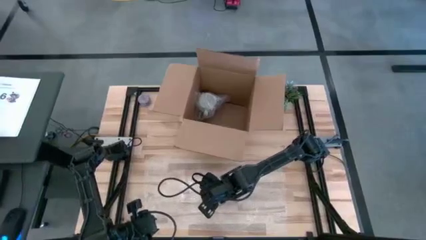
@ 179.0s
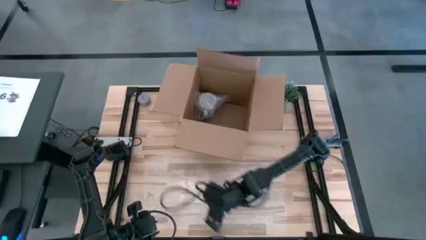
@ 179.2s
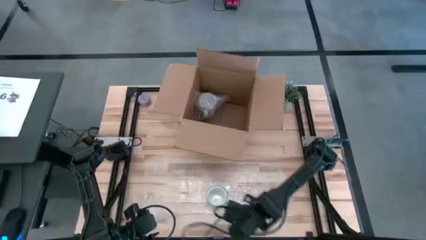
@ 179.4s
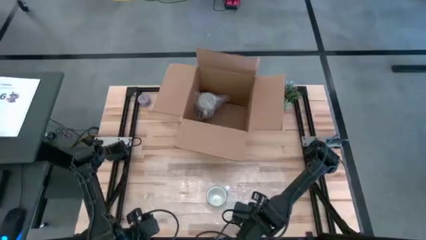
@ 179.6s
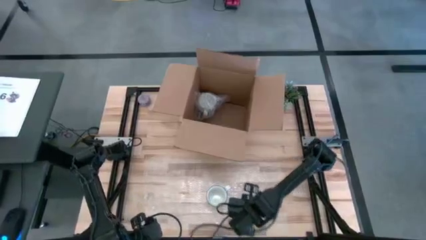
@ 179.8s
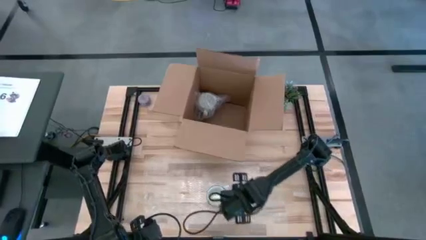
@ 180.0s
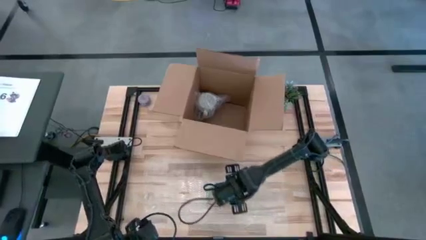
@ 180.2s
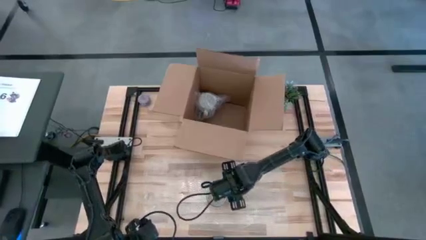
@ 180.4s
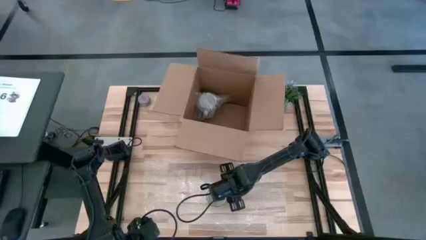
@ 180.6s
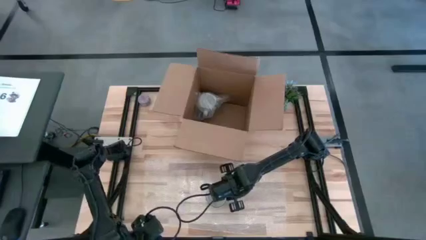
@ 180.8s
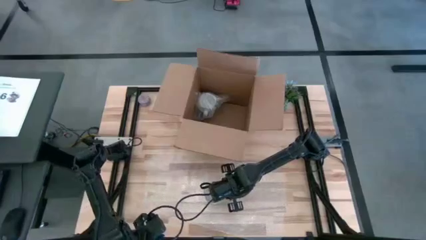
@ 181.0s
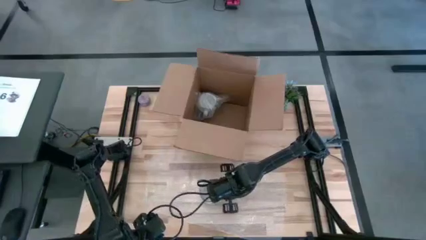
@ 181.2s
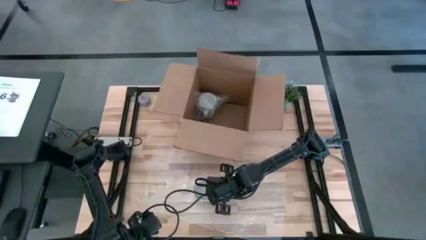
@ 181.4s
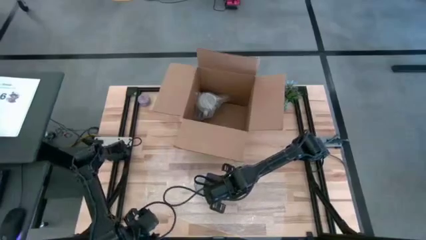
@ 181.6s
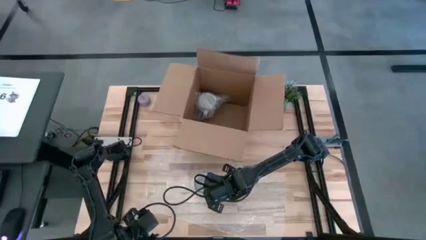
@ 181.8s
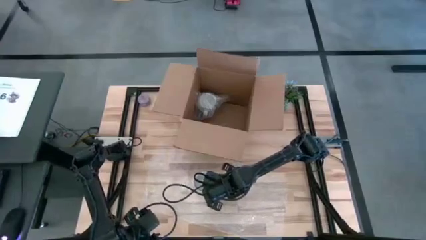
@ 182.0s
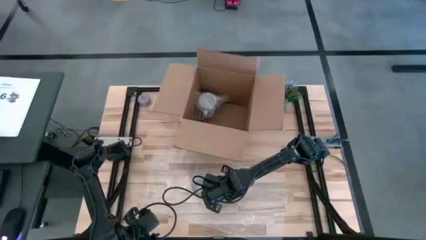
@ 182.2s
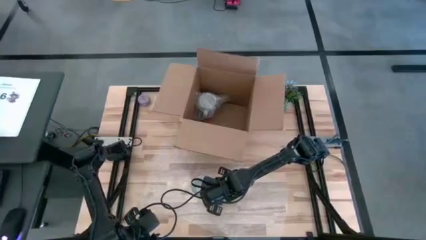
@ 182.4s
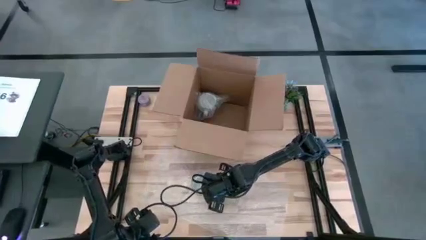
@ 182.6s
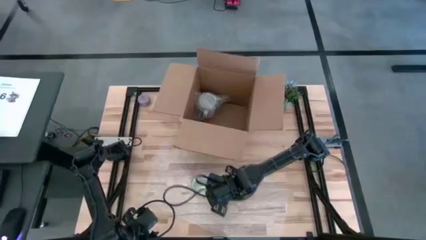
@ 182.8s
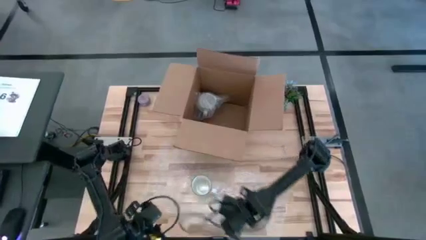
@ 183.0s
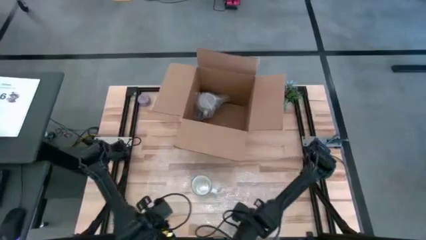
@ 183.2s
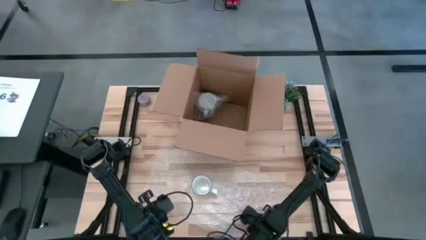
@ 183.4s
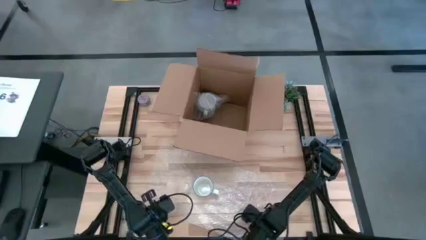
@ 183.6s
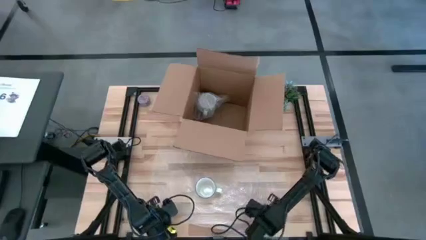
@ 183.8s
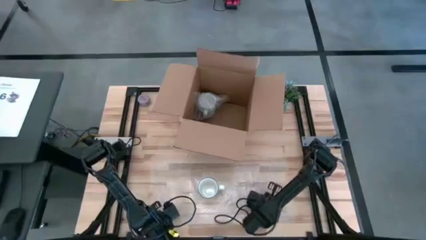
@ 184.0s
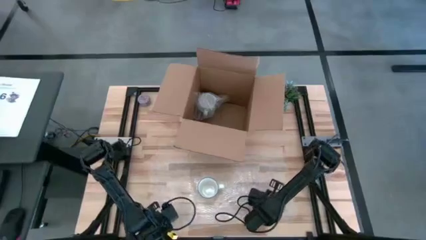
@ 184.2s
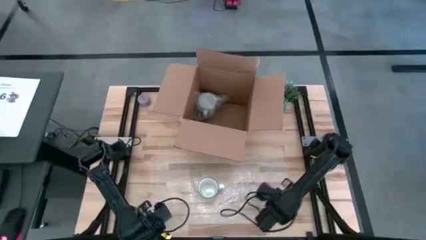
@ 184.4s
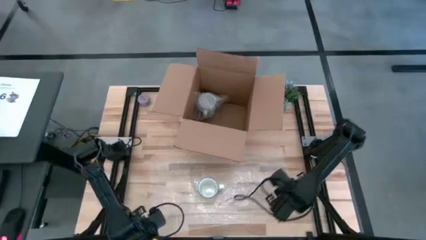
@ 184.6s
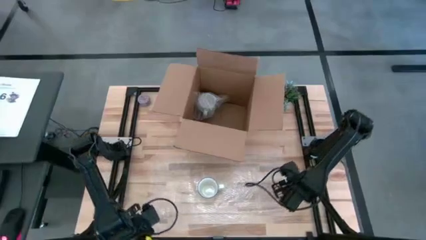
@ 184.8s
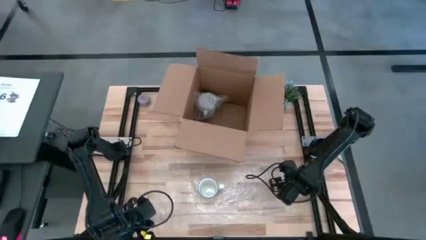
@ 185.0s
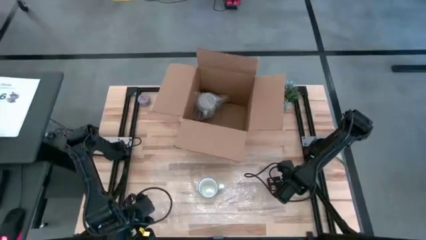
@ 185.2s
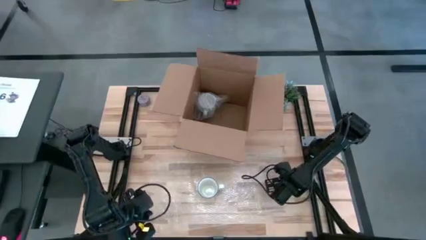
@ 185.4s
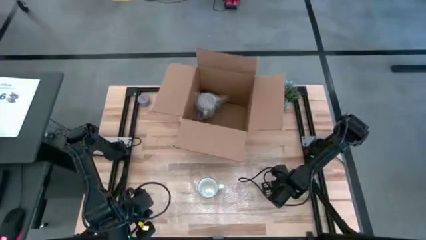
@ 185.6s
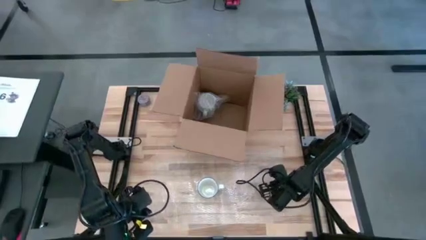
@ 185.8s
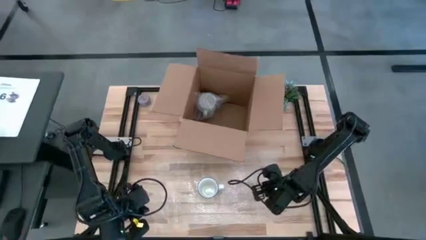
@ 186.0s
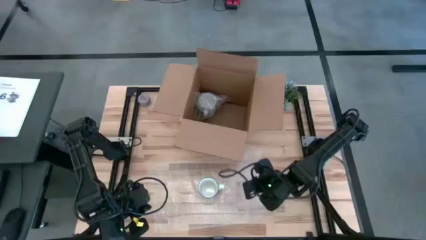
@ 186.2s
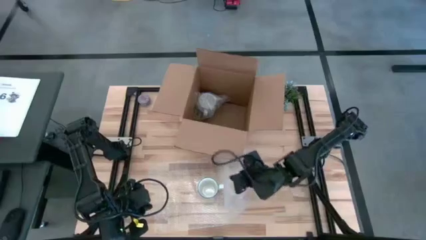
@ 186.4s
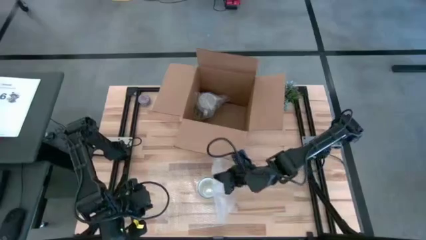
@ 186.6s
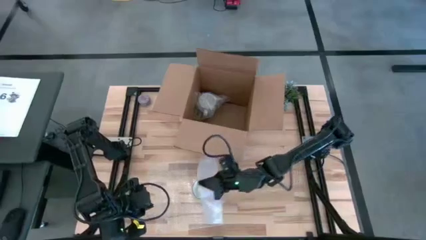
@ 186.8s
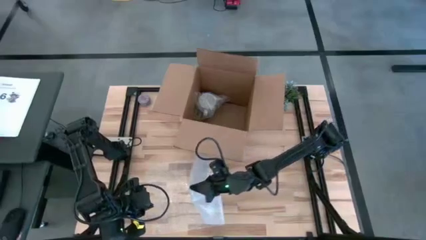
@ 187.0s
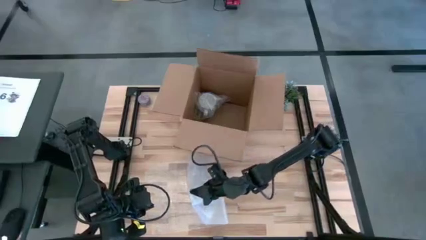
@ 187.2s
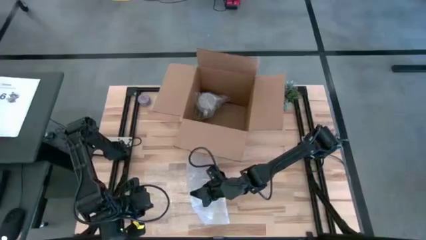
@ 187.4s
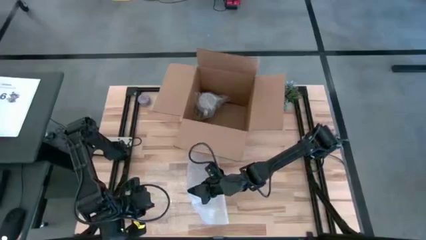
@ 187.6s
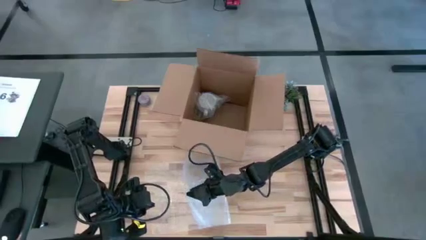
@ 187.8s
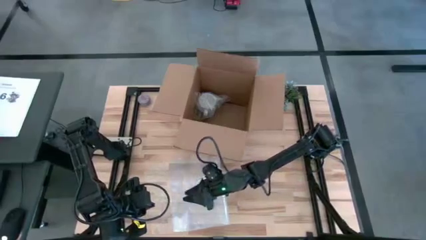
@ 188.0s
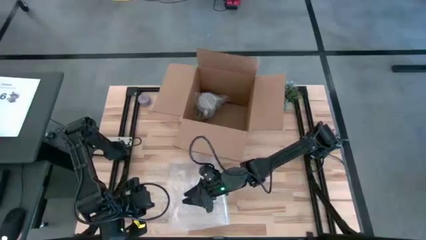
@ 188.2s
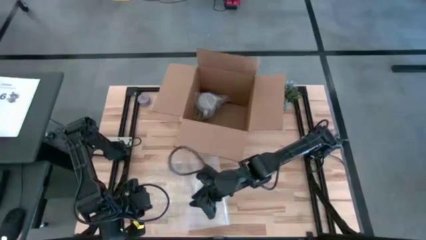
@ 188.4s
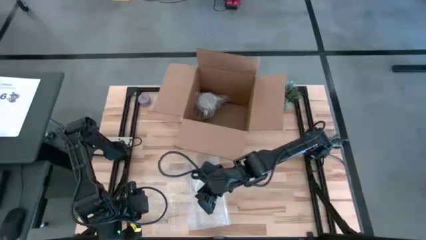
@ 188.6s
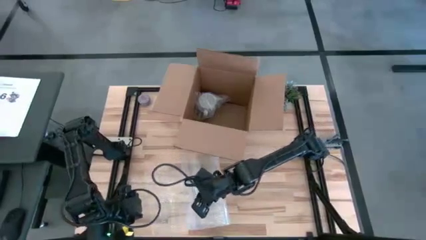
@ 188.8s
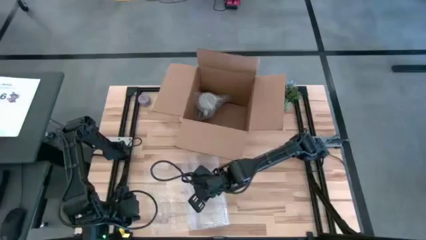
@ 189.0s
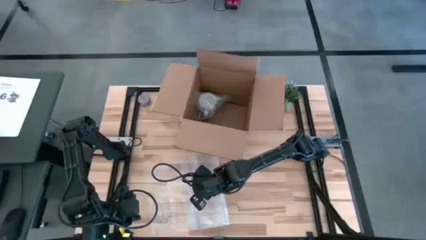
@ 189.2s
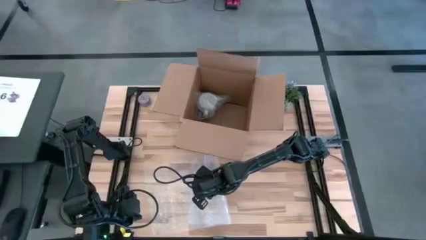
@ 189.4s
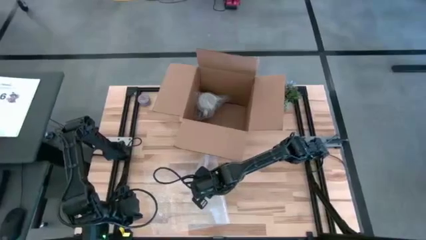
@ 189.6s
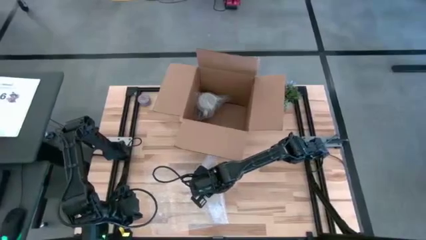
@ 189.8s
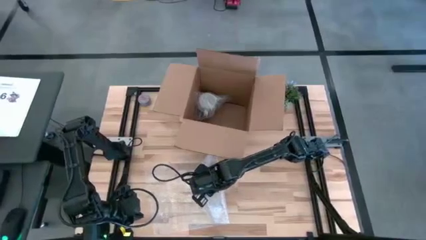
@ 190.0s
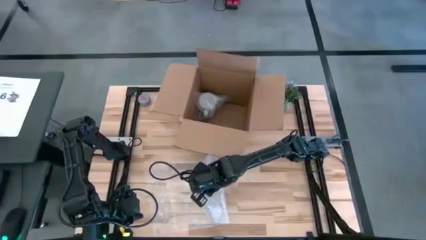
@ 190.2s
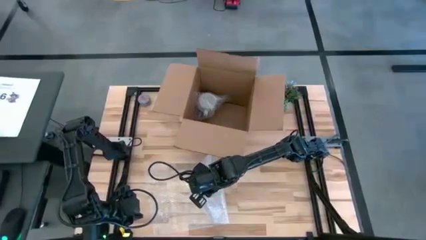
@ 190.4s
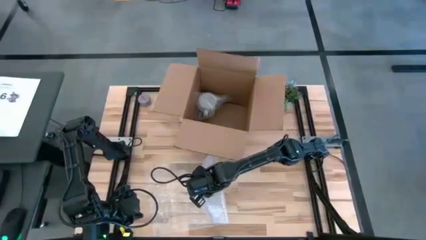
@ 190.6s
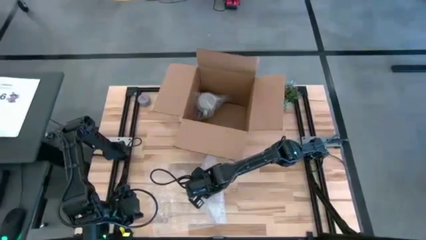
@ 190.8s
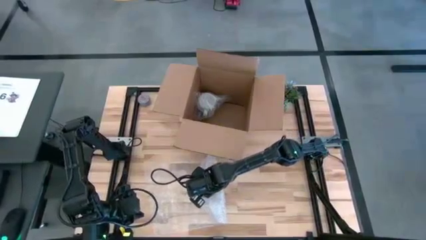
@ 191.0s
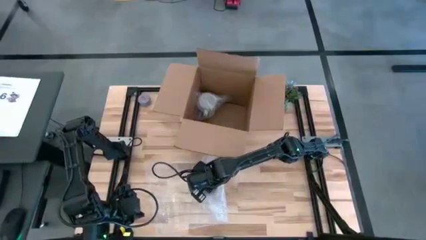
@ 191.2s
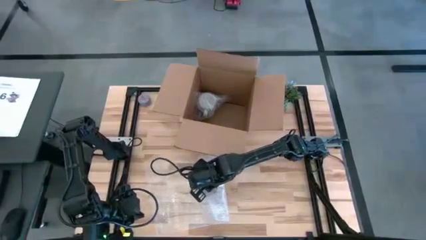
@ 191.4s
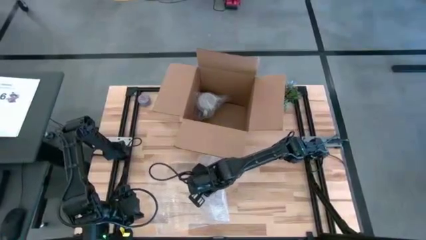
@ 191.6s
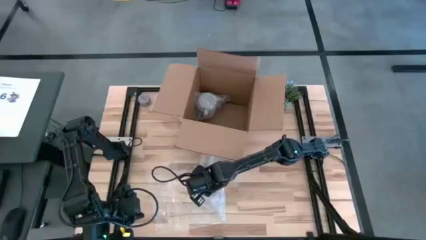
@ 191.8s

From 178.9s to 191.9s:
Task: wrap mug
Wrap the white blue mug with the transparent bubble wrap

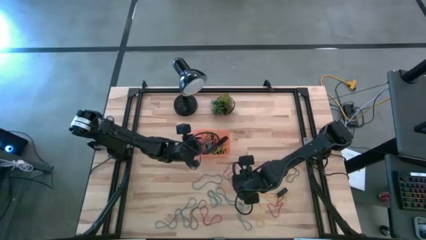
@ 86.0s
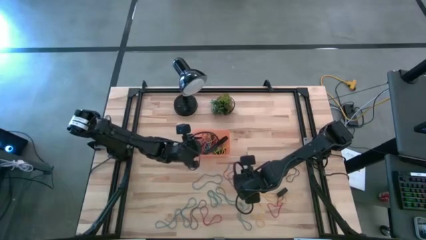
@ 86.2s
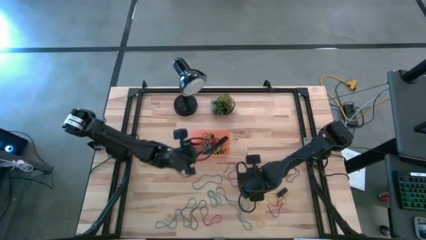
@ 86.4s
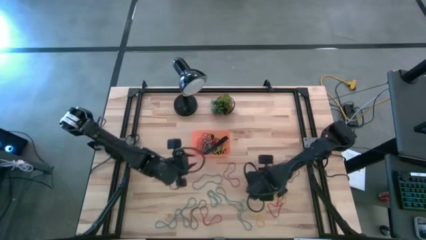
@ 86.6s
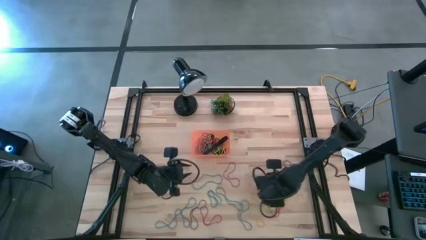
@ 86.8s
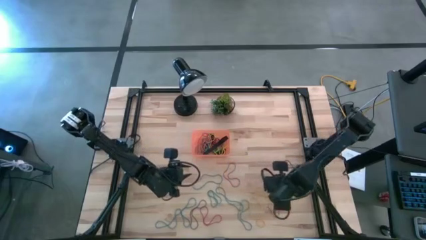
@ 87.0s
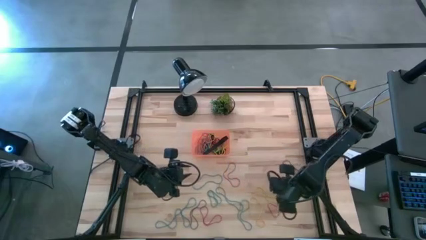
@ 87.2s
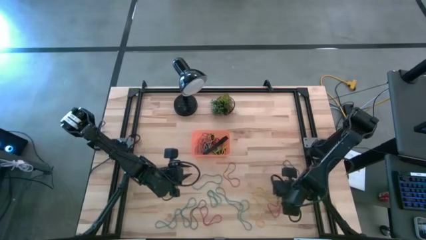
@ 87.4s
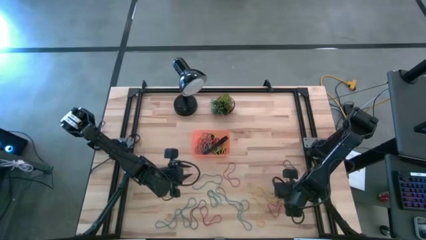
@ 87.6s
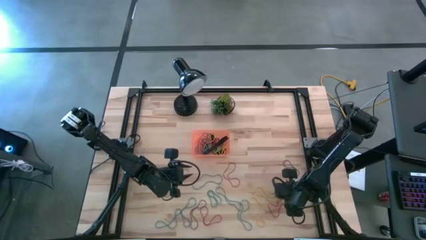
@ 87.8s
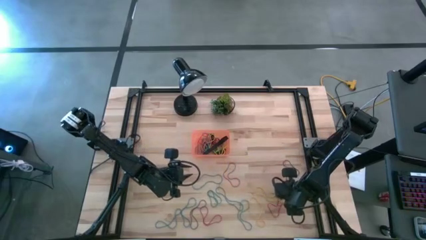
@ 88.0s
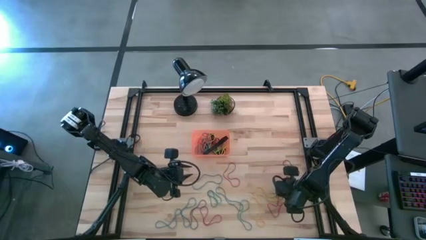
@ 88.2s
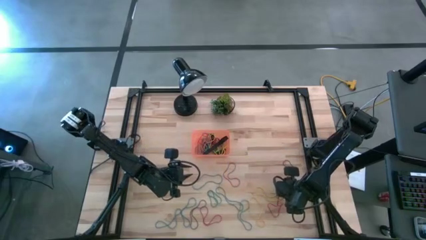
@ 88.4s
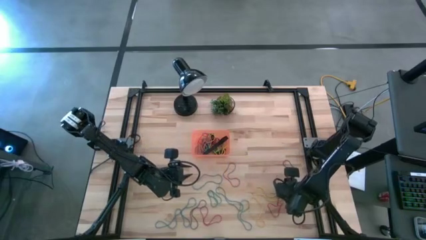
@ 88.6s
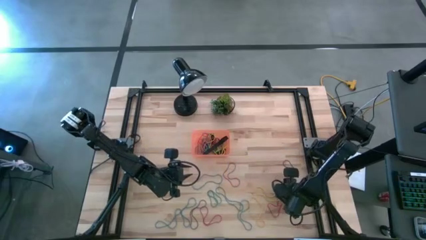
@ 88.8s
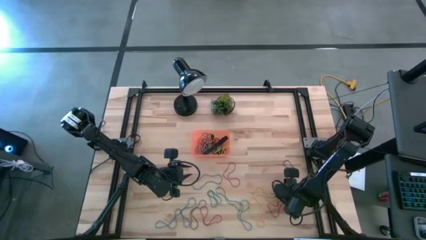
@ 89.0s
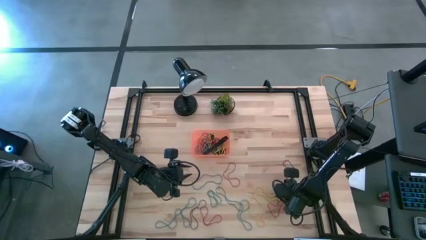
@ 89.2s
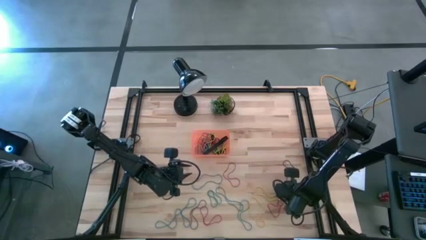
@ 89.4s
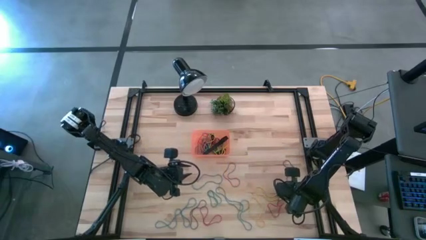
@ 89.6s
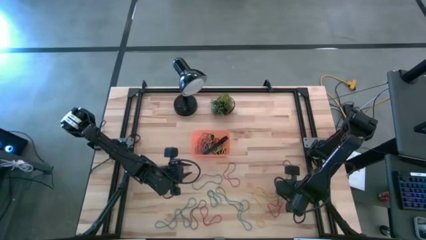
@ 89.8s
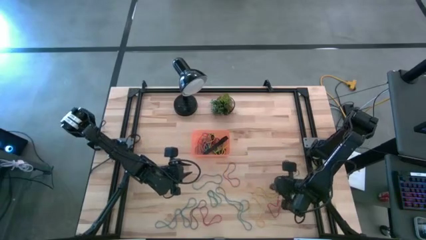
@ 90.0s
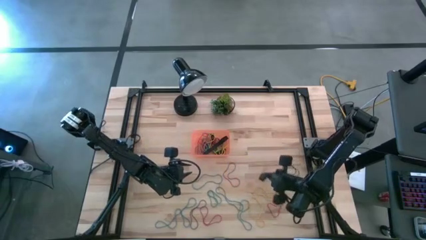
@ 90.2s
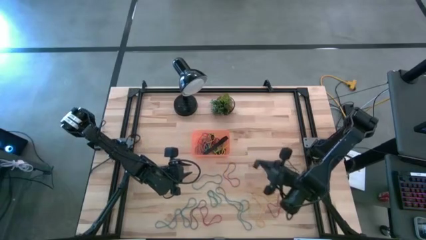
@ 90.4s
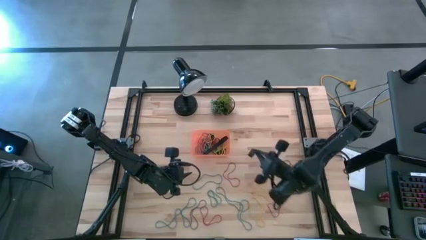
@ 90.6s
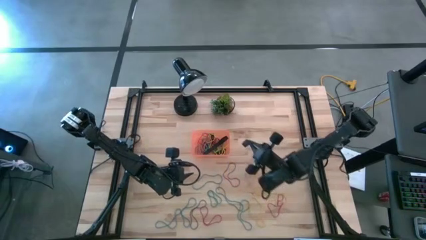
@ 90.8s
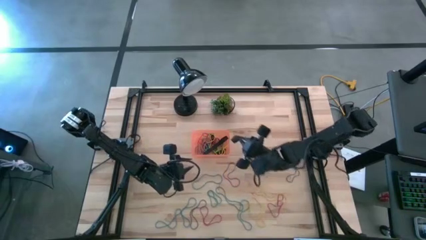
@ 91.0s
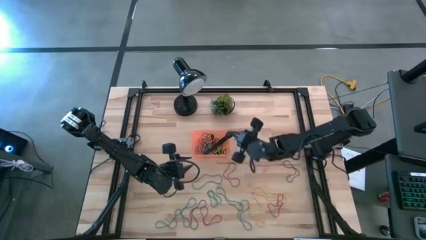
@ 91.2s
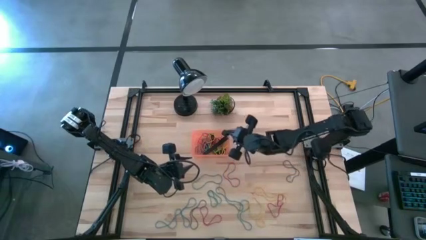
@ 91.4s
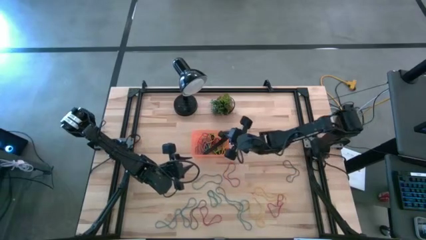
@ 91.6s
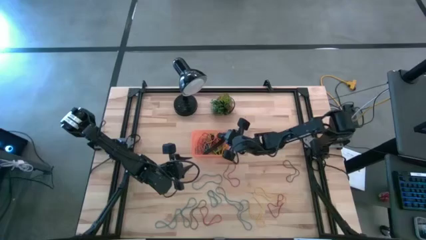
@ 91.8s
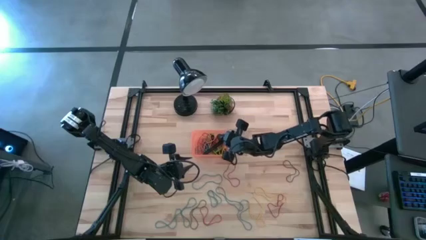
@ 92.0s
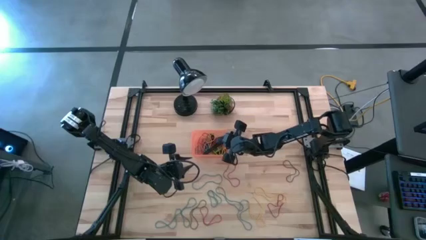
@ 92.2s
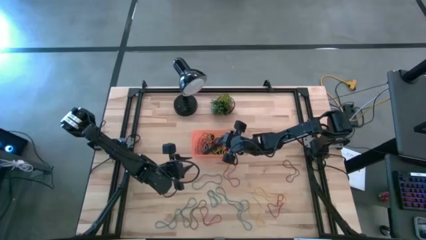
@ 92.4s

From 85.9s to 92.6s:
Task: Pick and place rubber bands into bin
Put the black rubberband into the orange bin
